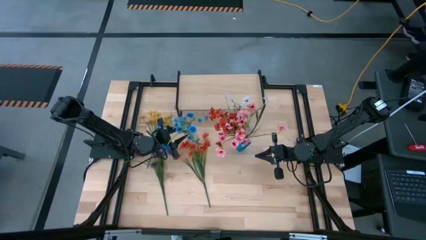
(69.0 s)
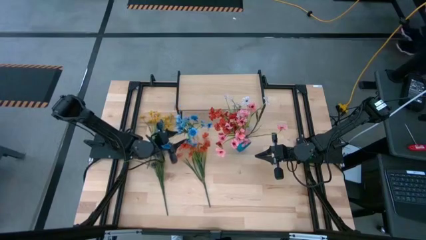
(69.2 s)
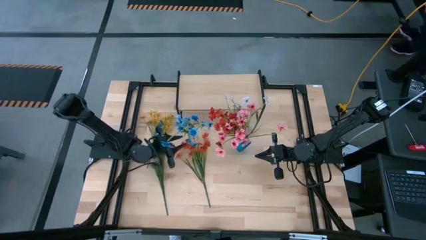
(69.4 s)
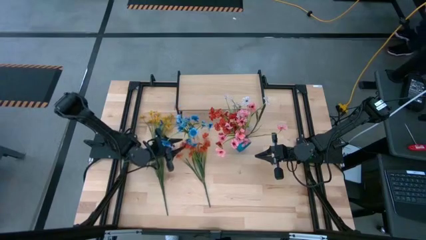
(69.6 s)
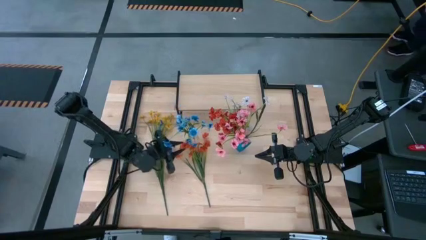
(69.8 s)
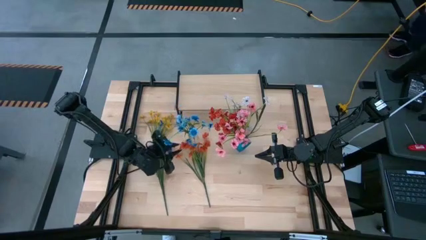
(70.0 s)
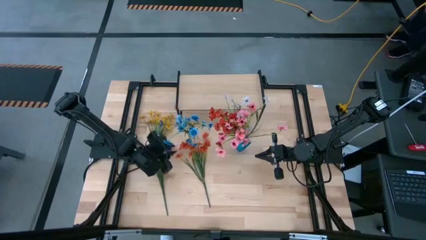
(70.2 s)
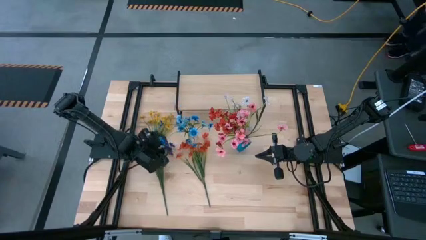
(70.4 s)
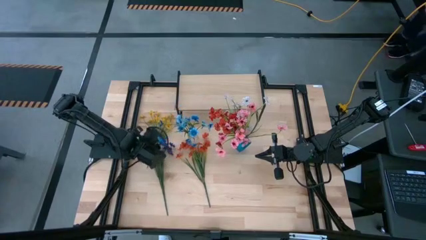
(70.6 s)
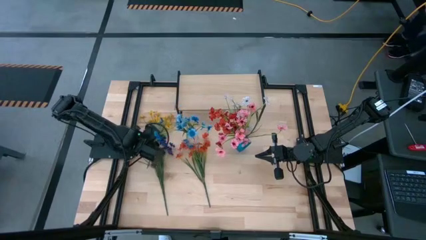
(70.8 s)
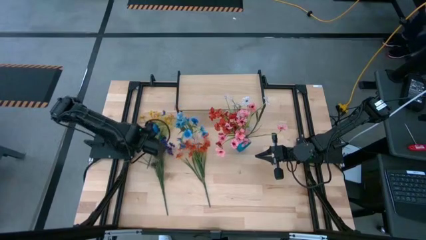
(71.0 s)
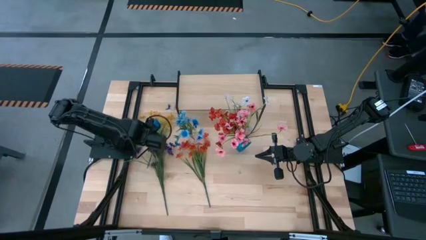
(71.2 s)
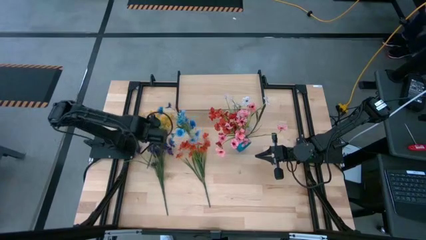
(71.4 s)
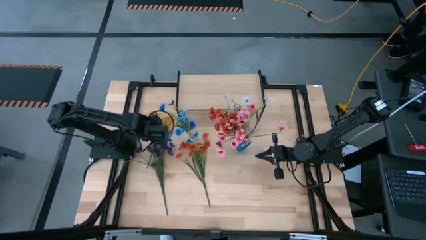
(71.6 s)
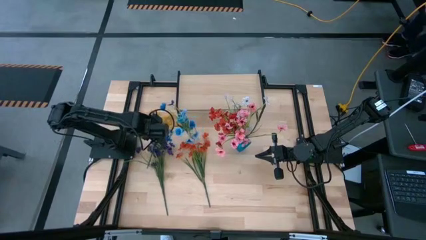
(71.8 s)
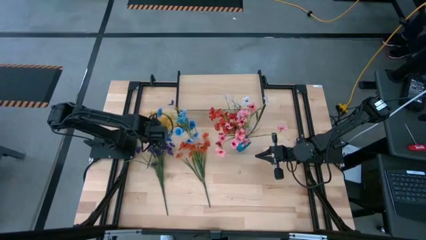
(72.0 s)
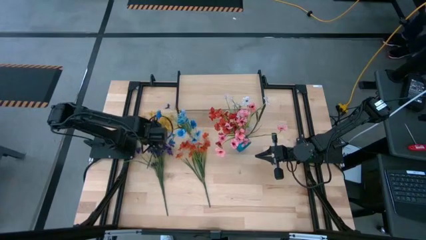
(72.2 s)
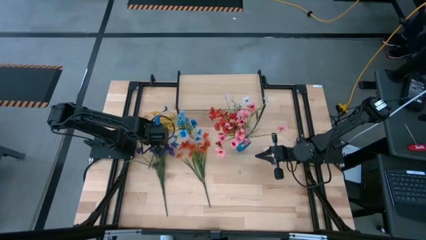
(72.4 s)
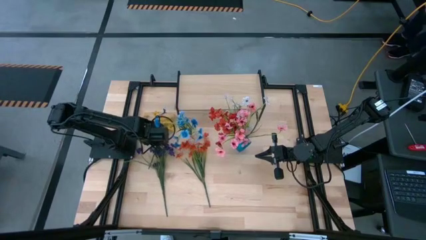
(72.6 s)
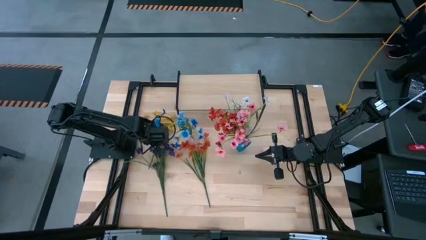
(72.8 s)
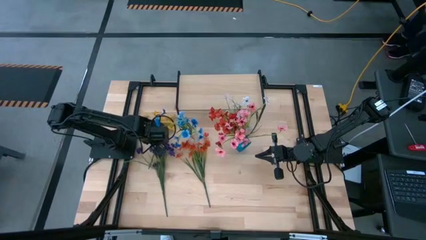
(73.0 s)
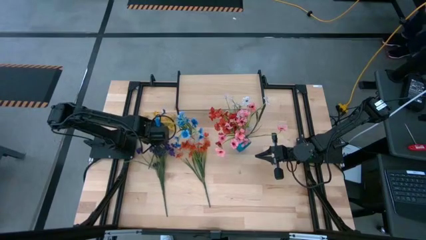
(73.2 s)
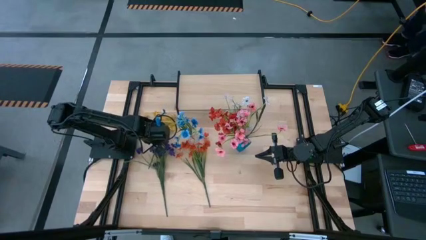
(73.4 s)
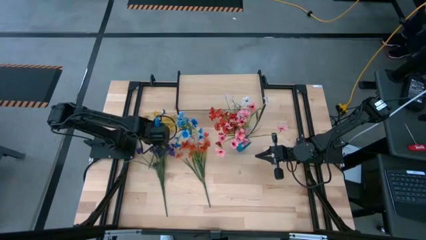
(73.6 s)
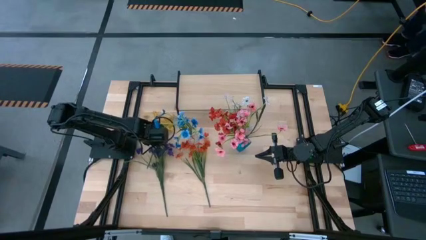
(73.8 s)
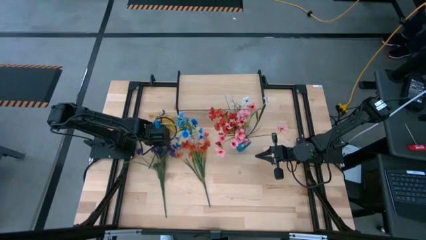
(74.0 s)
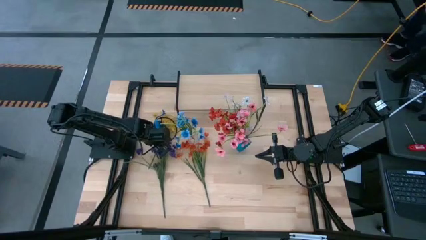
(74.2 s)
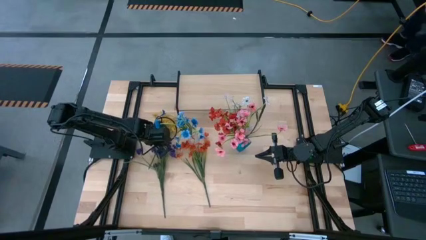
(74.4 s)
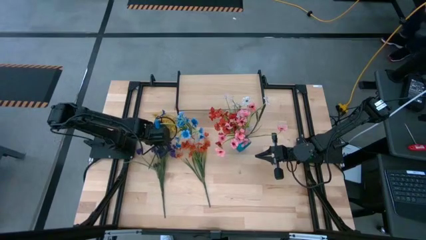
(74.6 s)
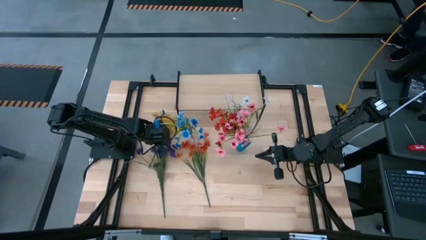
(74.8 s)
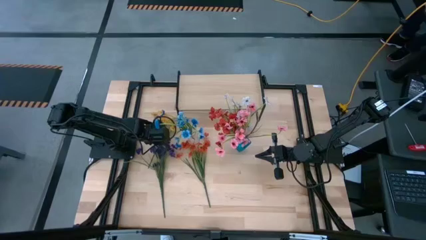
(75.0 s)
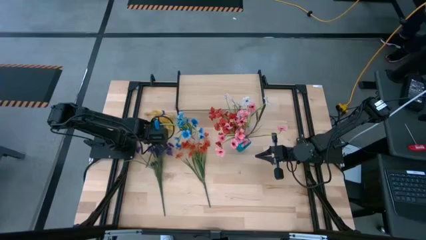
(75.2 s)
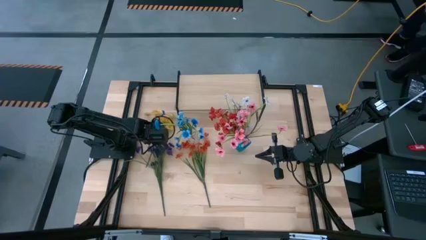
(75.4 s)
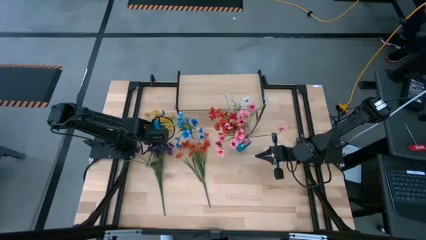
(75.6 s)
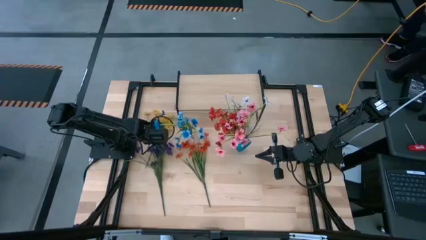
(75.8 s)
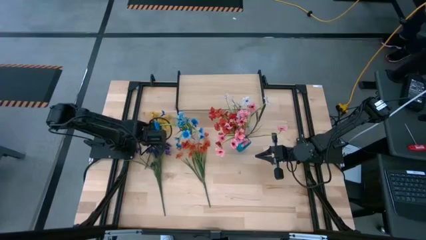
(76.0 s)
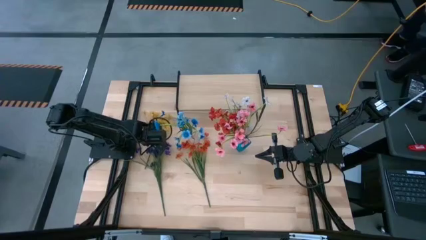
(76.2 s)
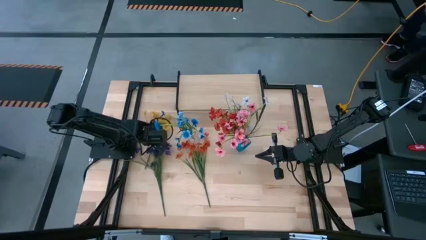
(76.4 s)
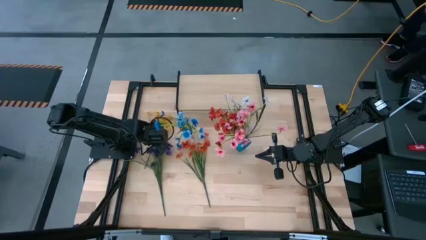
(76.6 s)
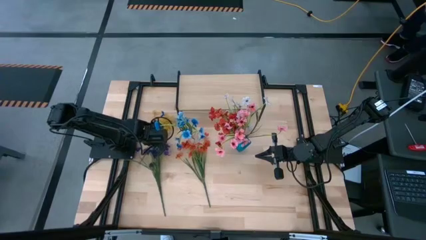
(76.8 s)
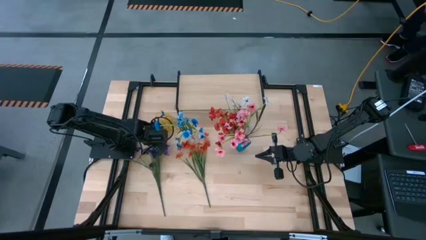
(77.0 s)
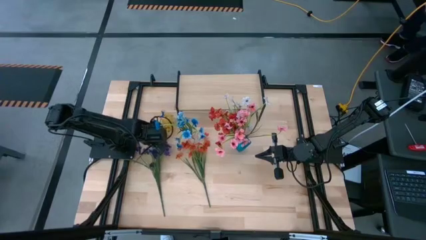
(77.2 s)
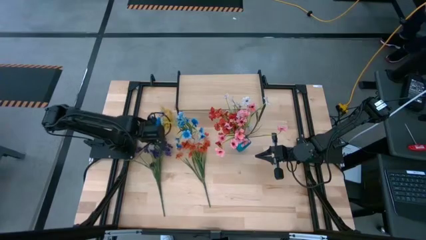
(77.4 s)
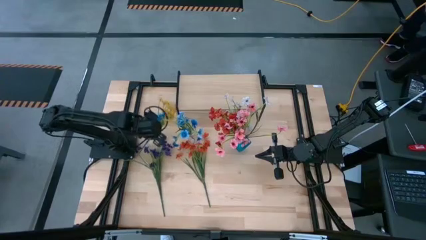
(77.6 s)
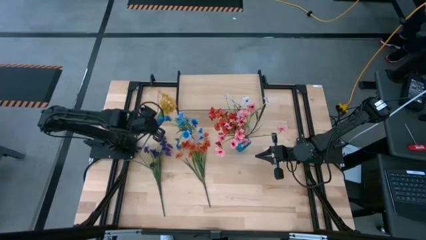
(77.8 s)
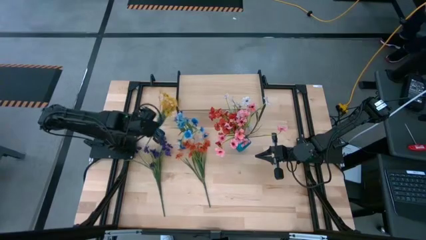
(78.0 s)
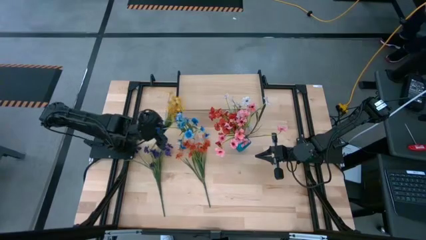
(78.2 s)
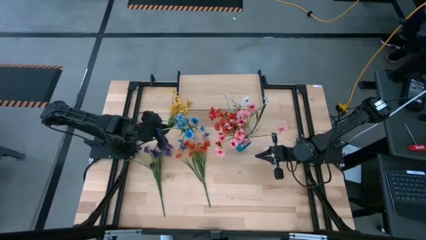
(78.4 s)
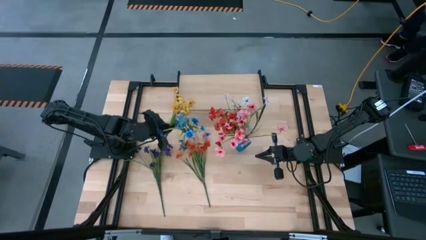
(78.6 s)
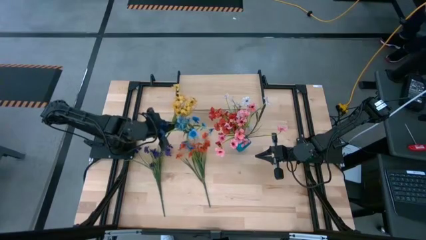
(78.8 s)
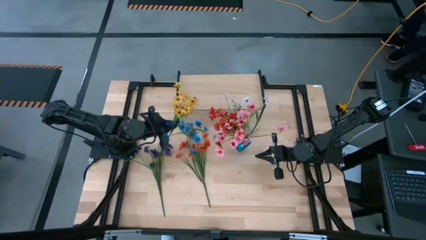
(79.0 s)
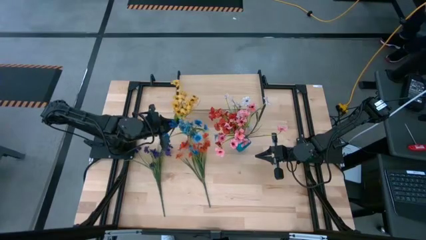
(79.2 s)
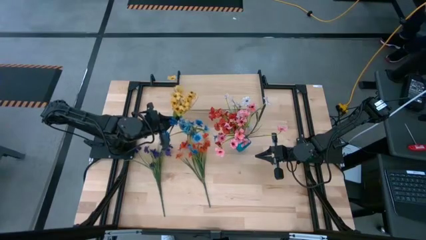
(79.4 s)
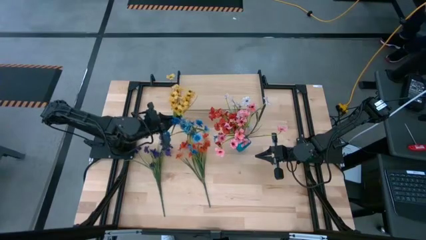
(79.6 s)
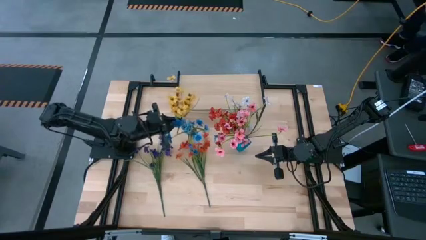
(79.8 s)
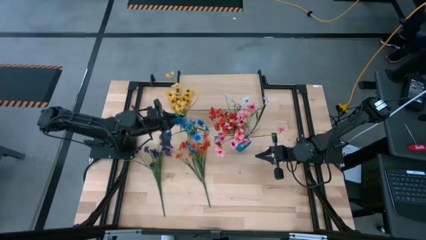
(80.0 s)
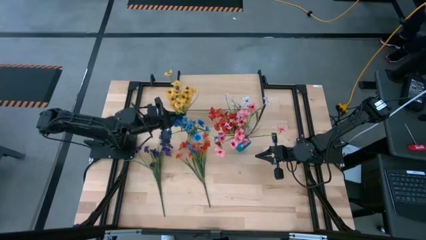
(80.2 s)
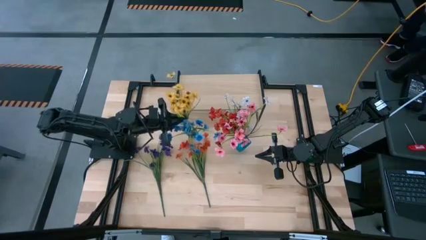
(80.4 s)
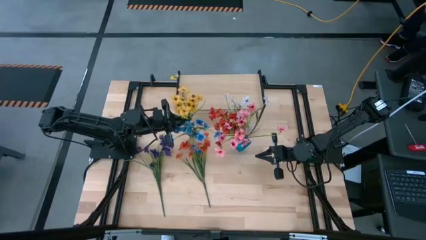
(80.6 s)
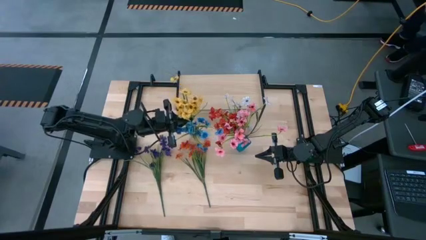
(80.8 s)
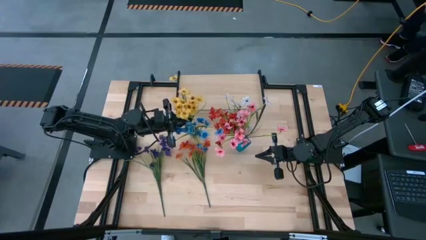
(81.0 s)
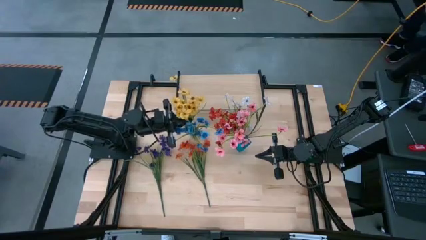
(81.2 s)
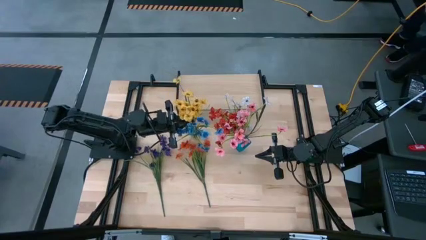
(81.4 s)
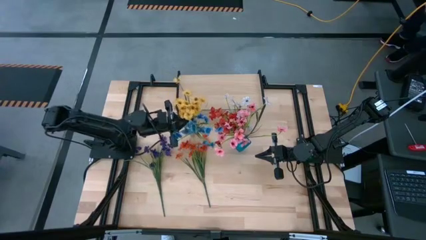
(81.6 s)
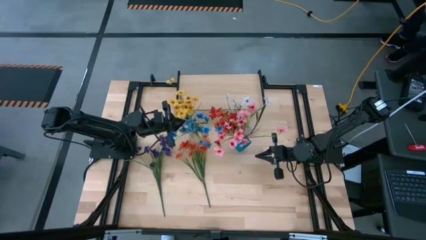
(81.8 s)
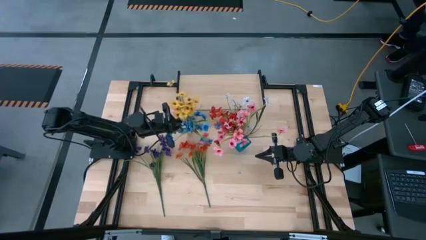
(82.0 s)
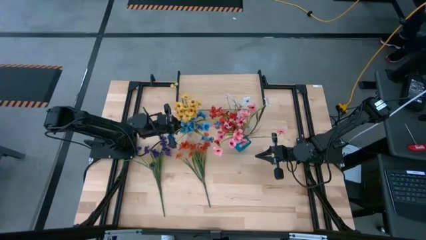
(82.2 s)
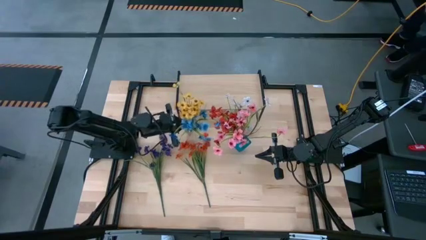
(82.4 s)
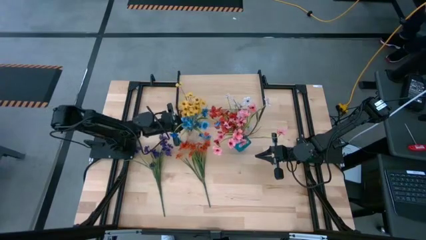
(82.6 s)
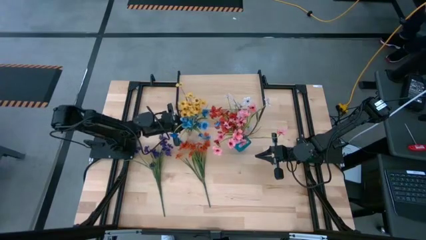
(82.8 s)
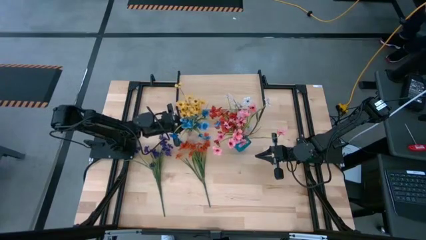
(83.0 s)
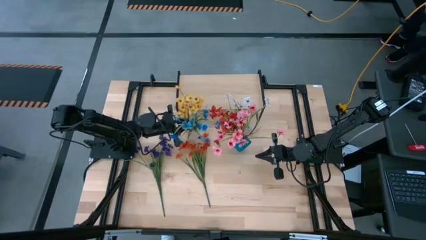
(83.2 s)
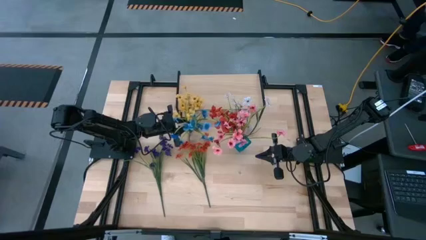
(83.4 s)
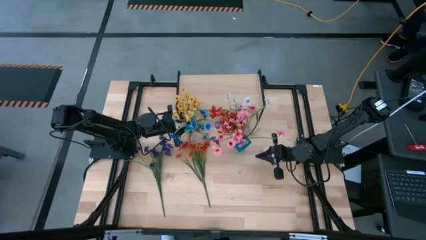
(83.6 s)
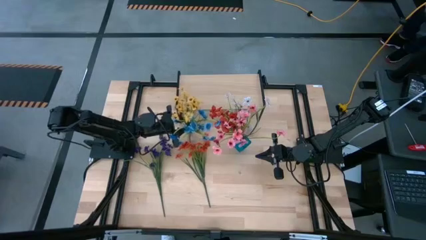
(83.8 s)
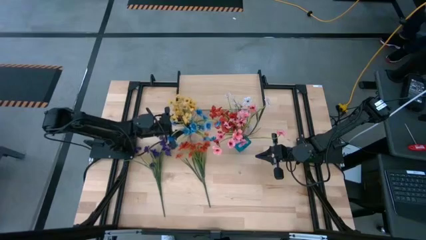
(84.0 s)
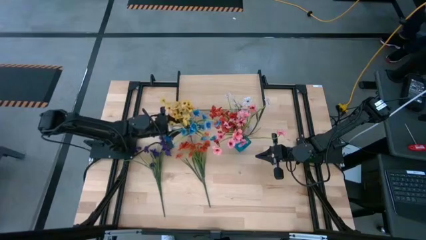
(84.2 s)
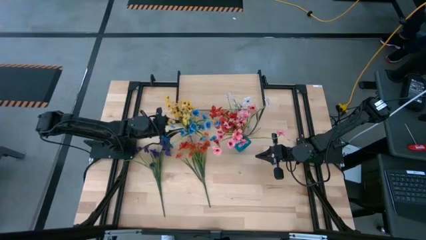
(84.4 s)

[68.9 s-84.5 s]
Task: Pick and place flowers into a vace then onto a shelf
Put the yellow flowers into the transparent vase
